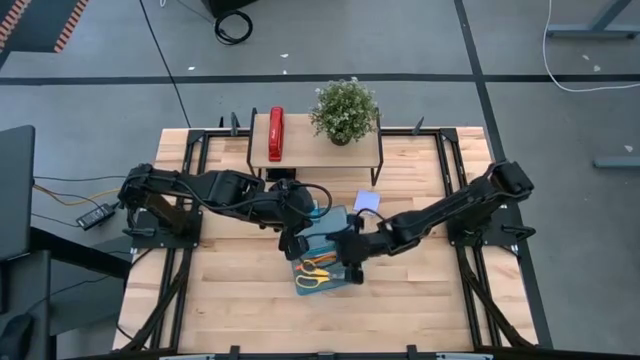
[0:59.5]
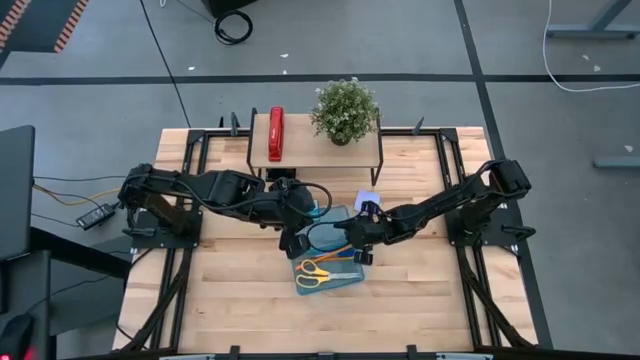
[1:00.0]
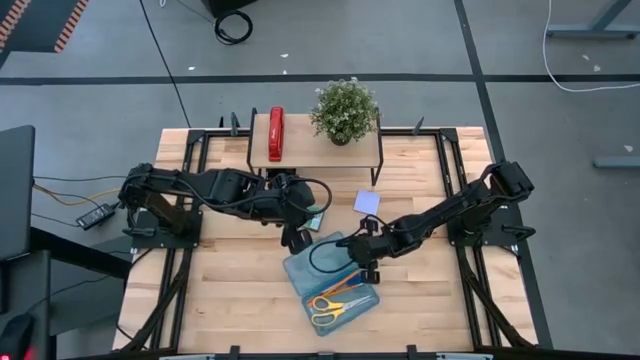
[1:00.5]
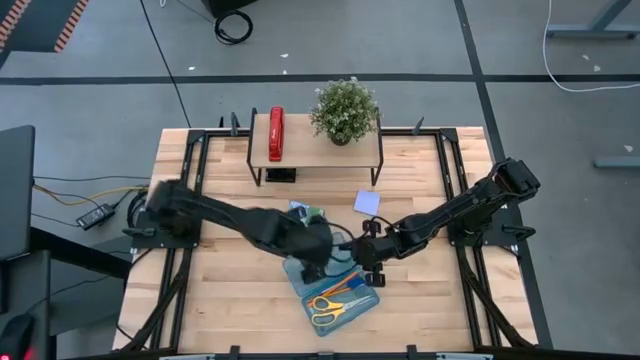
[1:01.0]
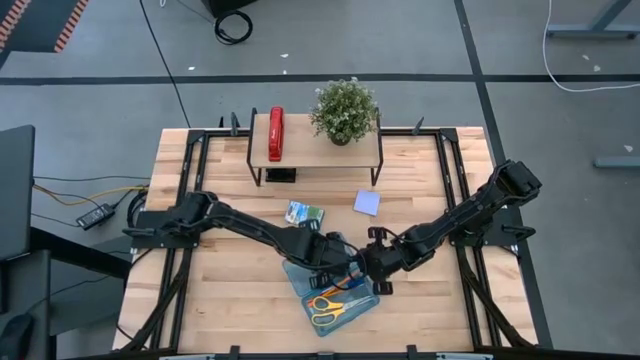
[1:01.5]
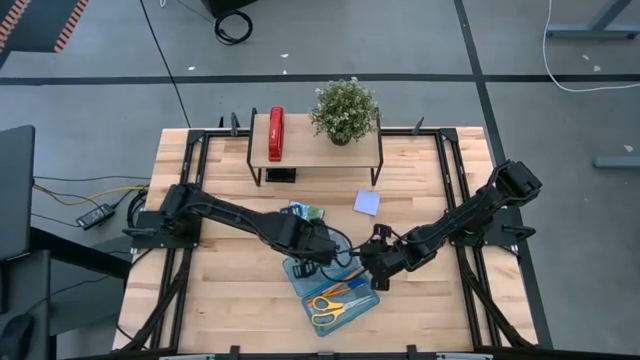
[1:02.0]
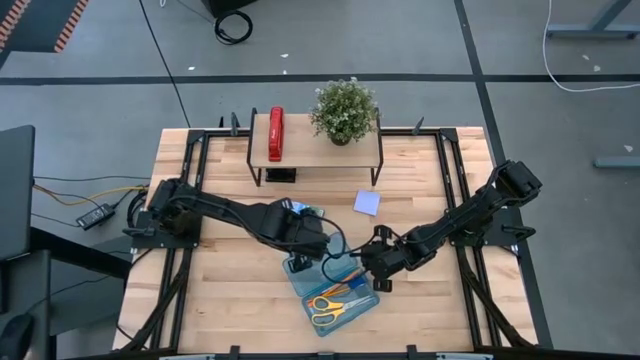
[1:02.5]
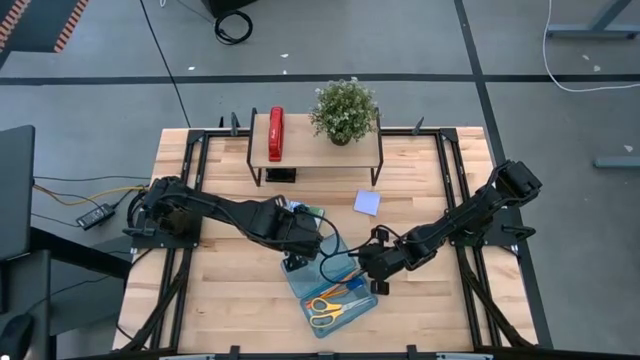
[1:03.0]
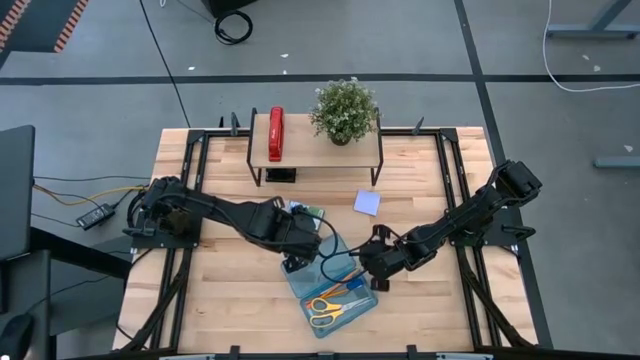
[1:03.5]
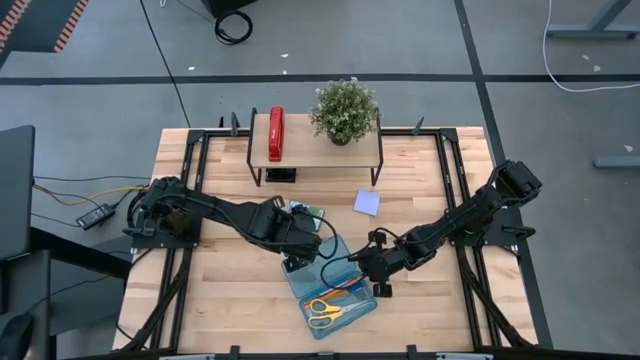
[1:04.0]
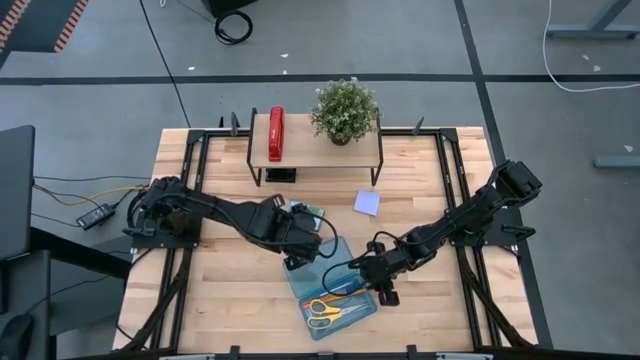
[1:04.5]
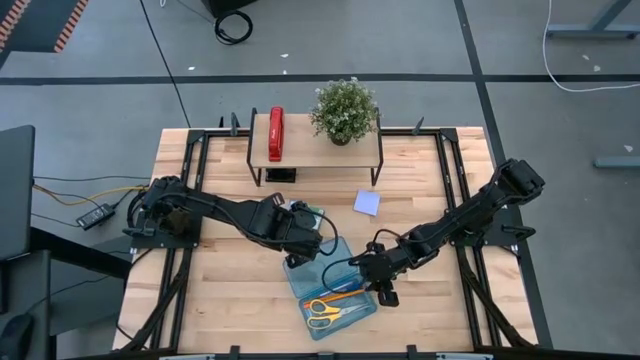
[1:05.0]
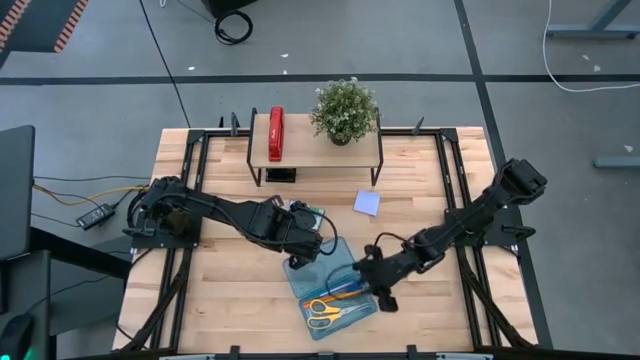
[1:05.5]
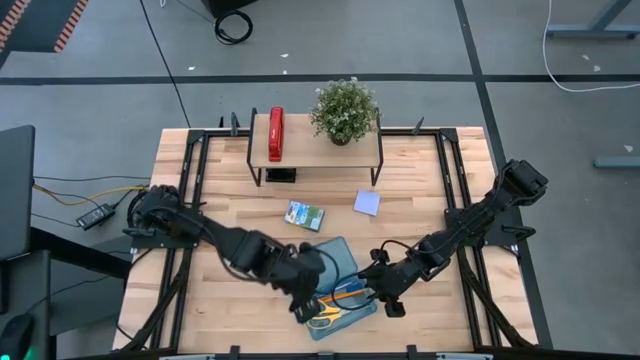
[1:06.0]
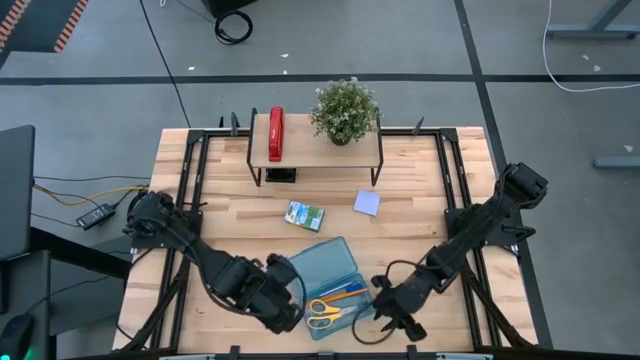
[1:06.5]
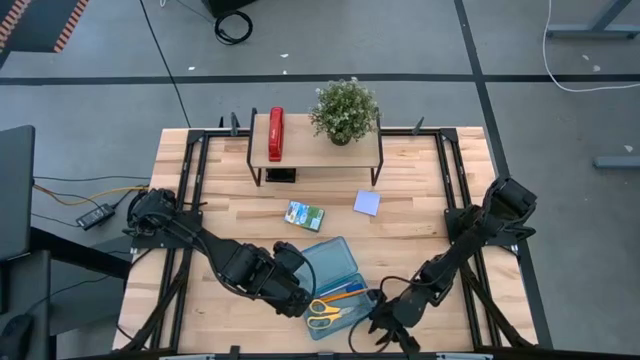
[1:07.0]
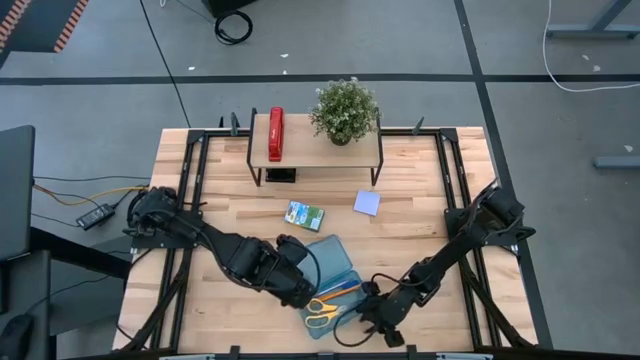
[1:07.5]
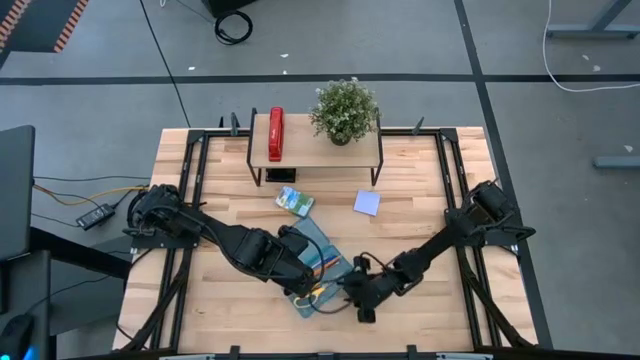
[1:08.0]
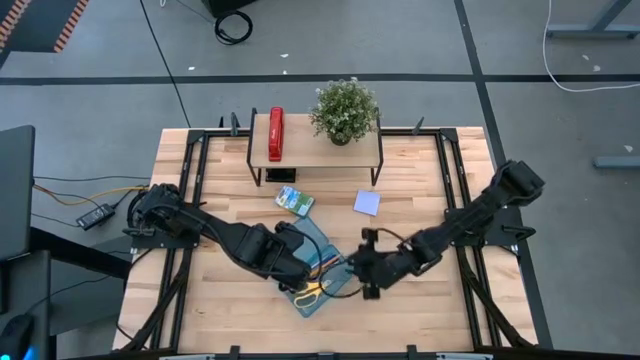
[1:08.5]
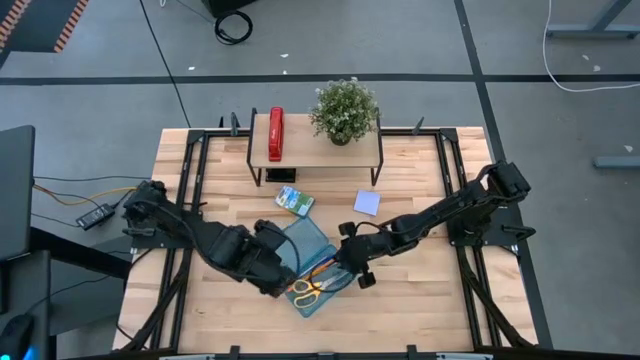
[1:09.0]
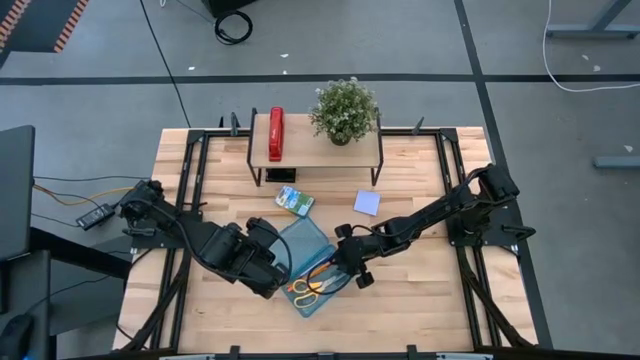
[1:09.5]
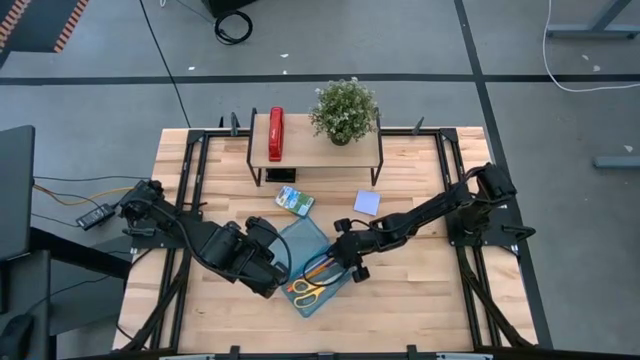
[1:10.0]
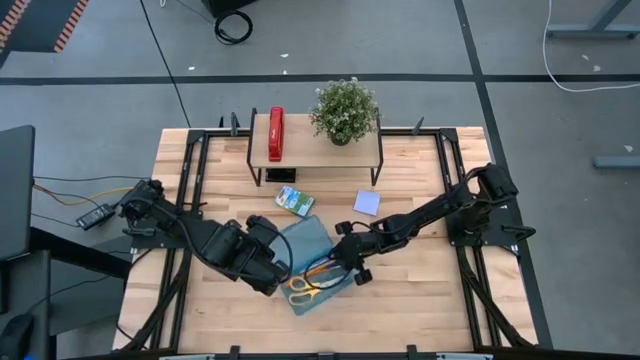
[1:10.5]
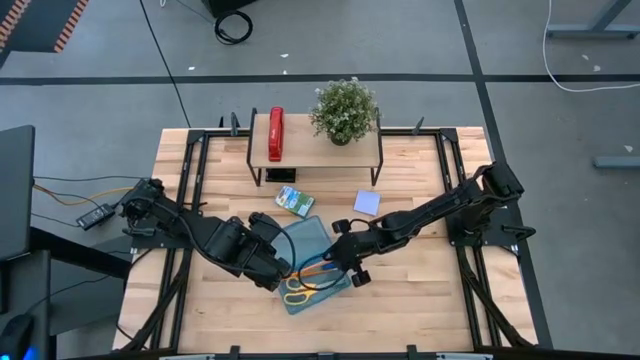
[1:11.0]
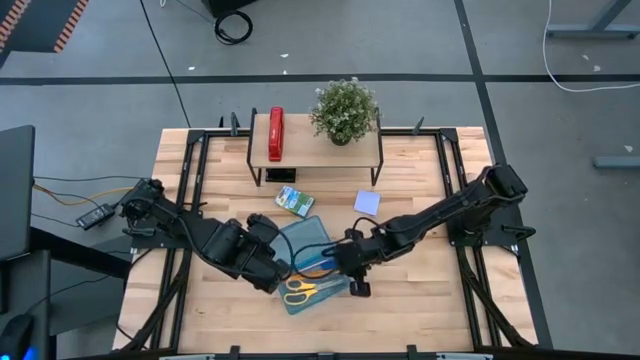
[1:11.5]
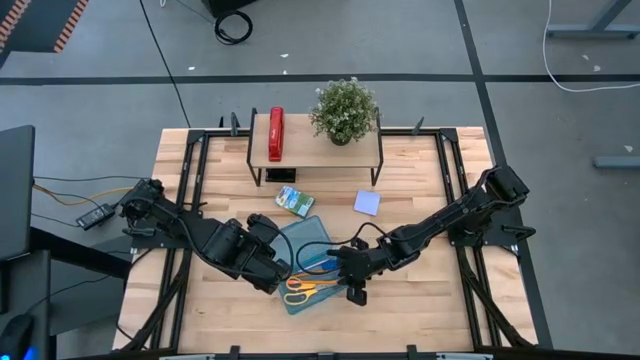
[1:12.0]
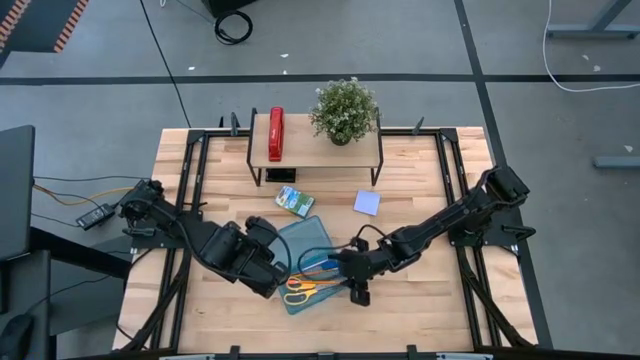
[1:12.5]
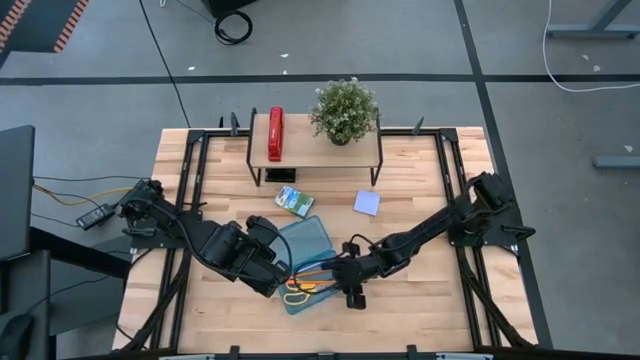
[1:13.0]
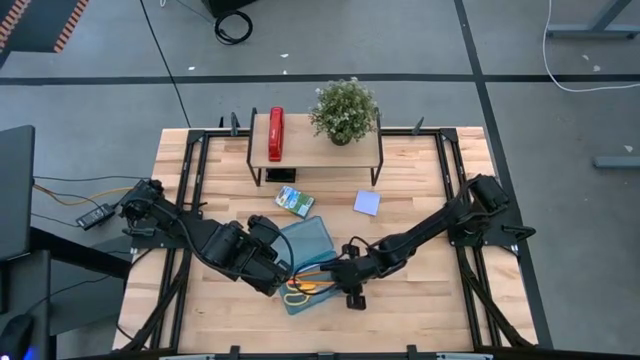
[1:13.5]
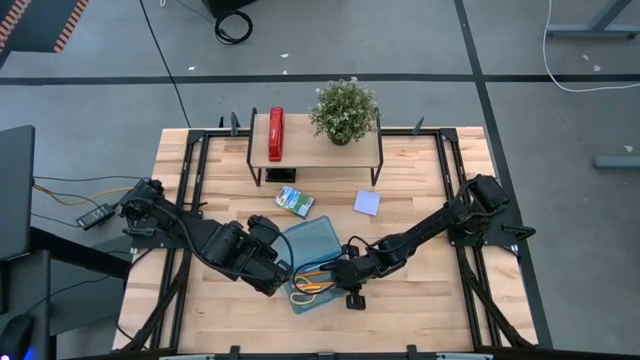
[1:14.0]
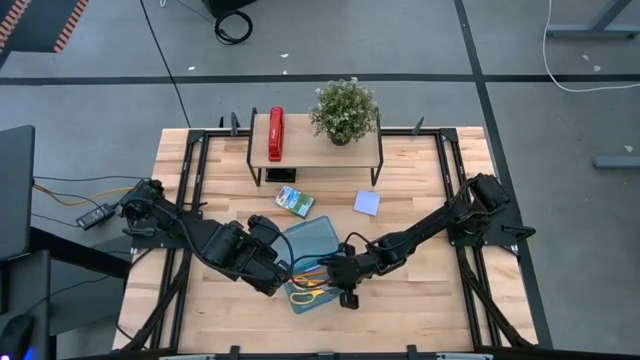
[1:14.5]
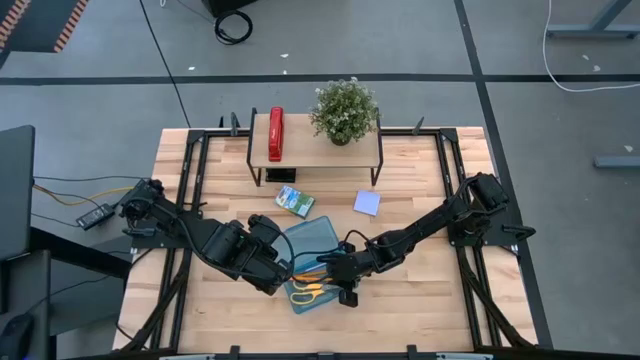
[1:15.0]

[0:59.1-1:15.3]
Task: Pack school essentials
Adjust the pencil in the blue supply box

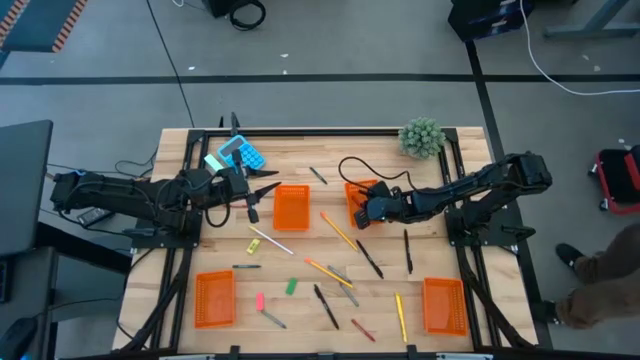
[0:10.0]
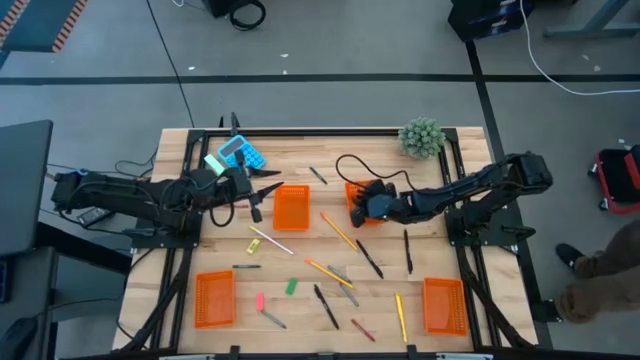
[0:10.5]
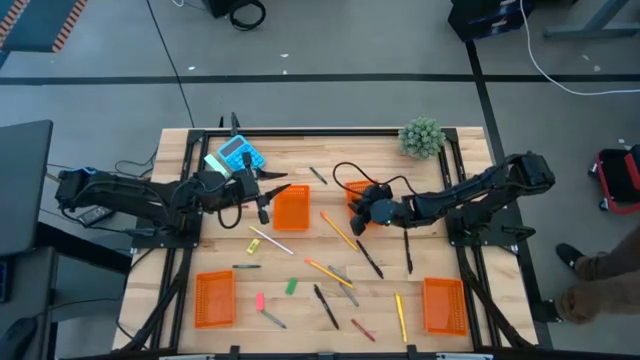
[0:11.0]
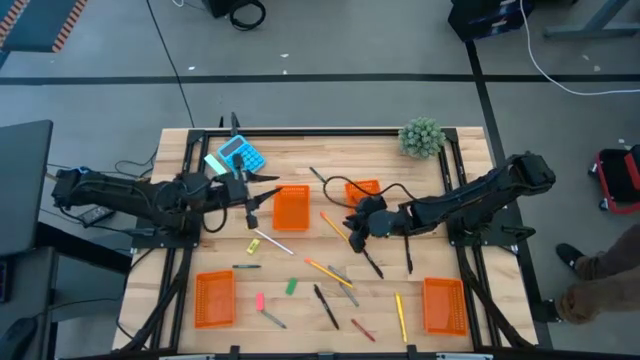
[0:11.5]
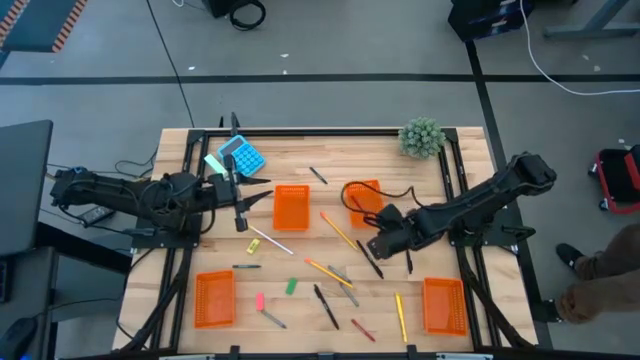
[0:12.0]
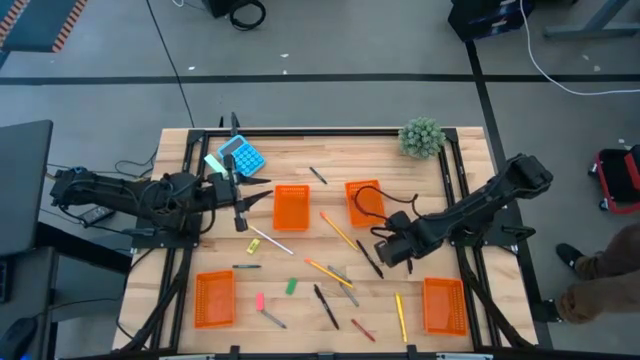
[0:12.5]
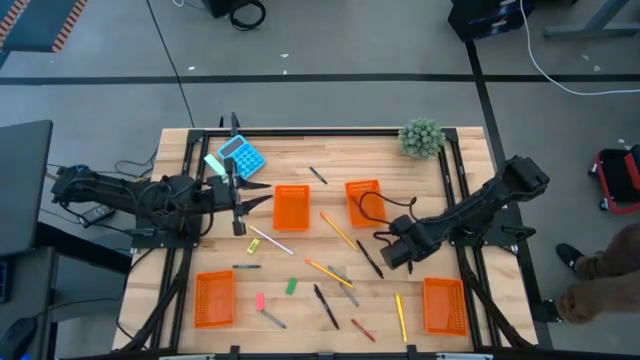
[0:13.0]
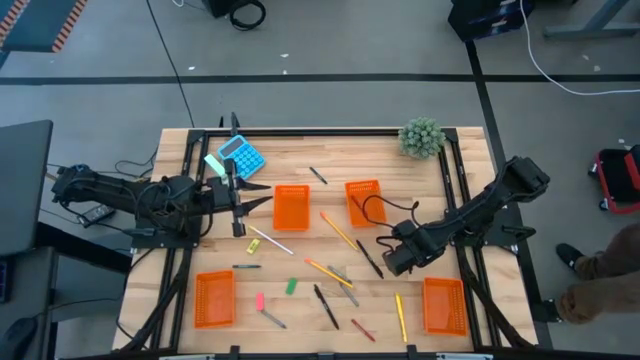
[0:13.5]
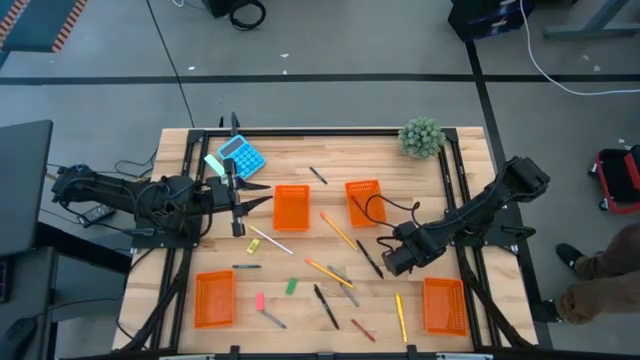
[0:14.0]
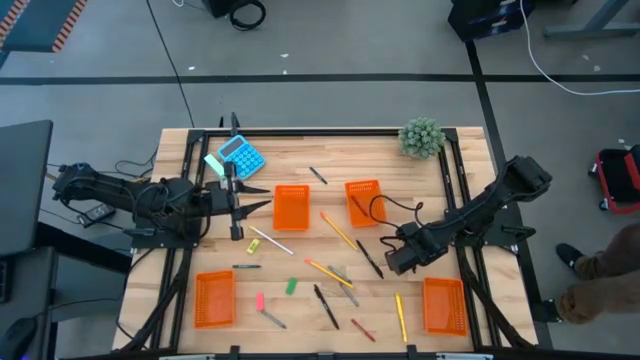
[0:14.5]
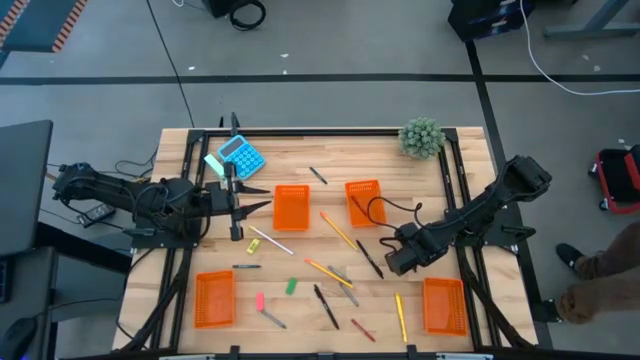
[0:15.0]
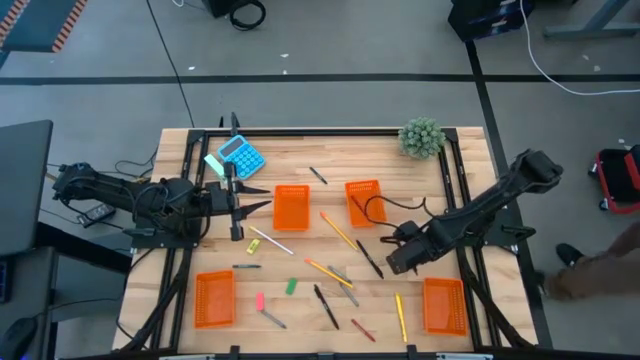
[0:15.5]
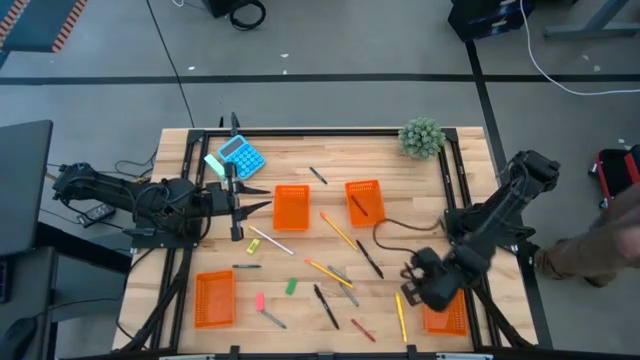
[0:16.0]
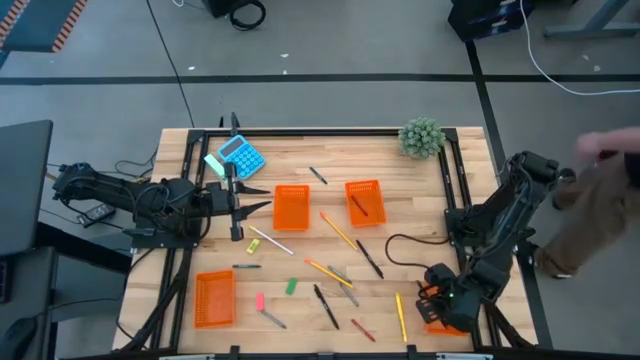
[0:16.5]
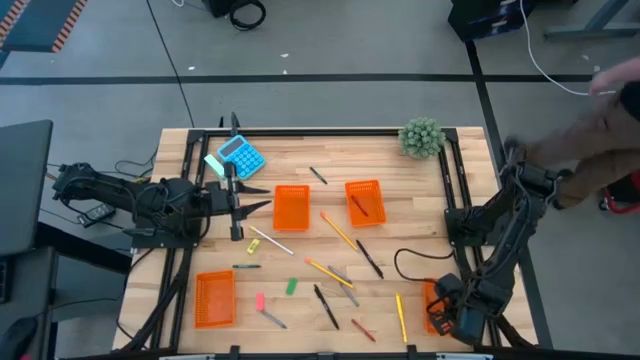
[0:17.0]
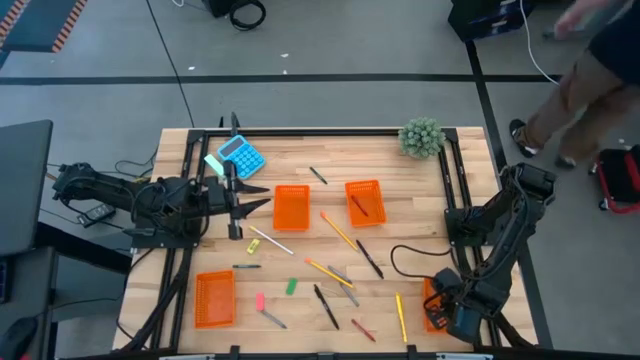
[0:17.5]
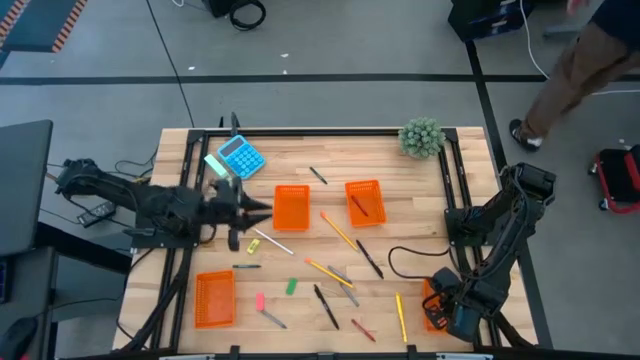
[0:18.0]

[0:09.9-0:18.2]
Task: Sort crayons/erasers/pens/pencils in bins
Put the top right black pen into the bottom right orange bin
